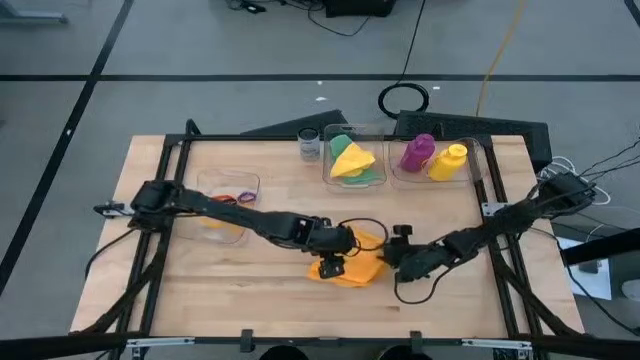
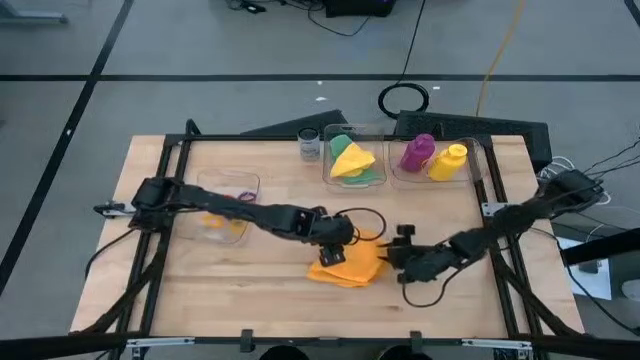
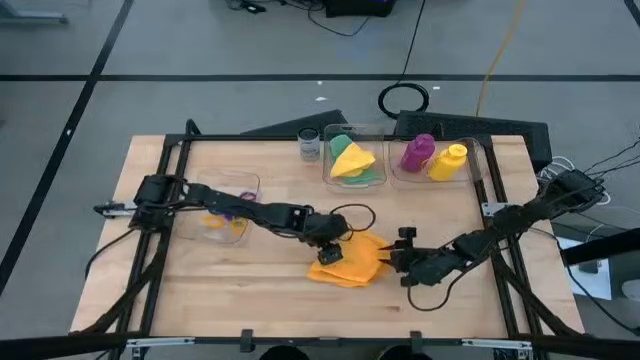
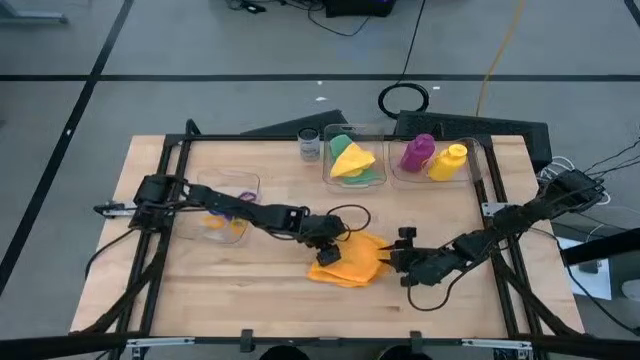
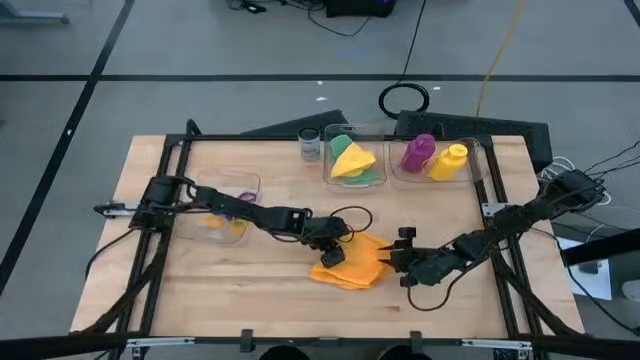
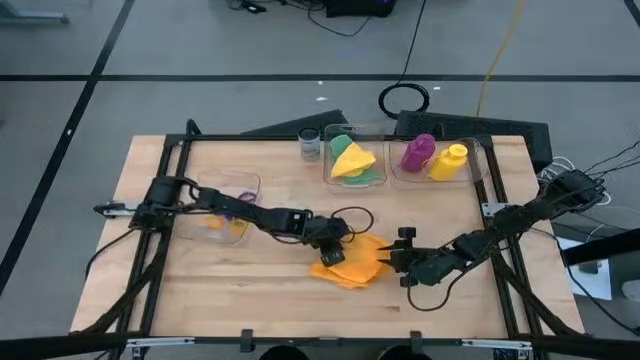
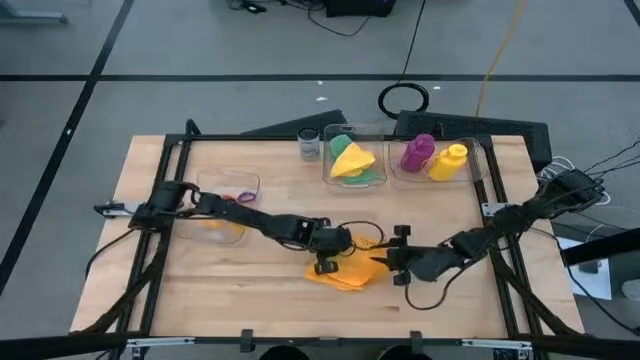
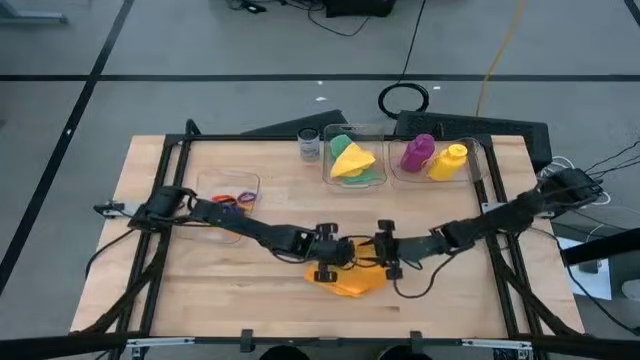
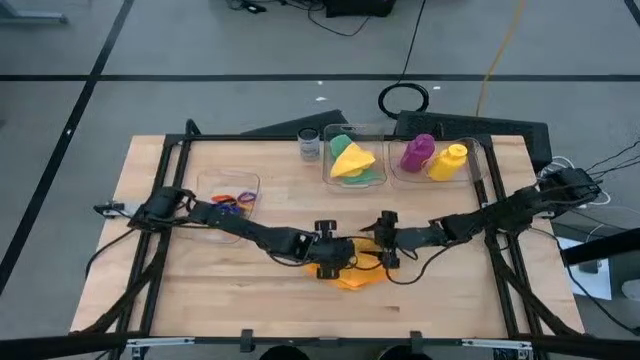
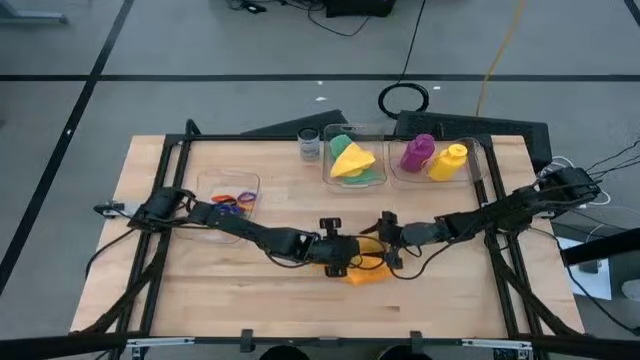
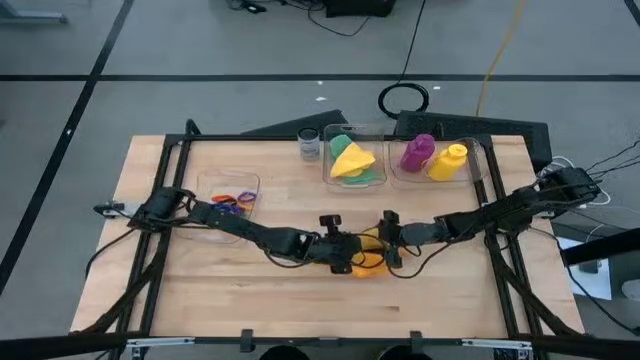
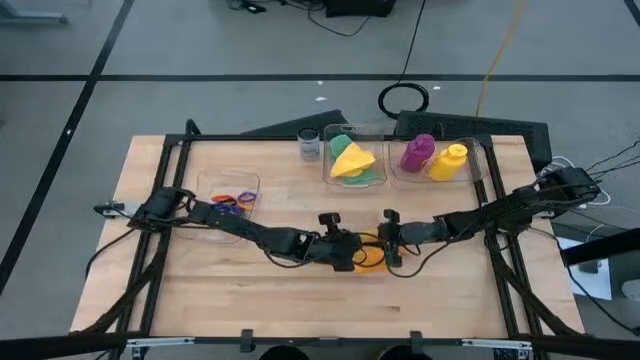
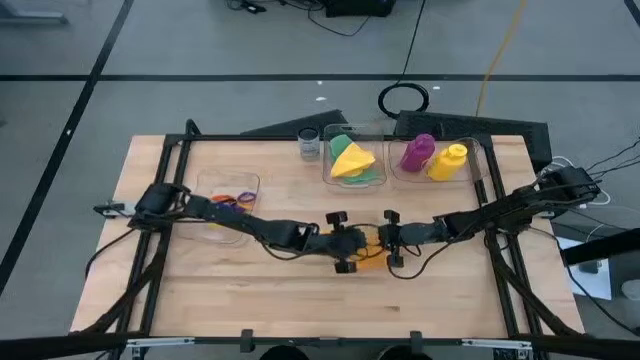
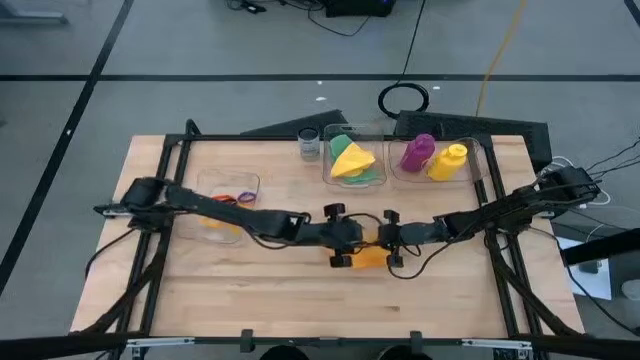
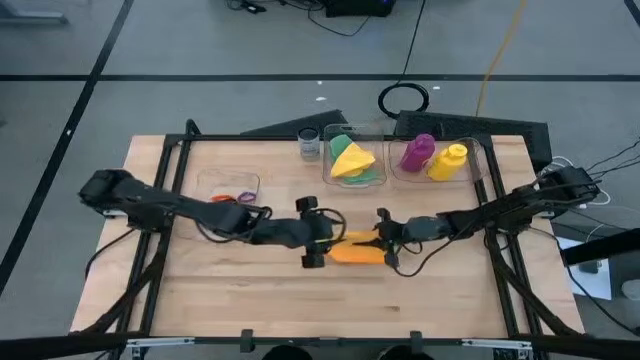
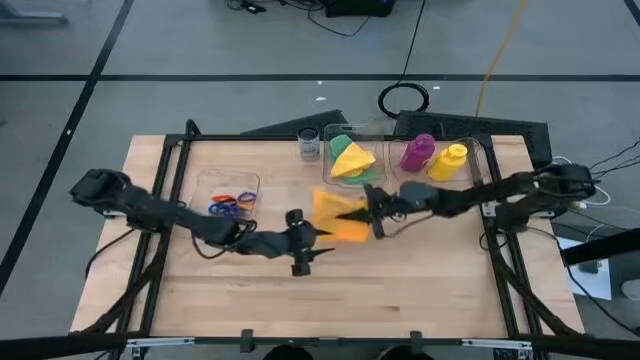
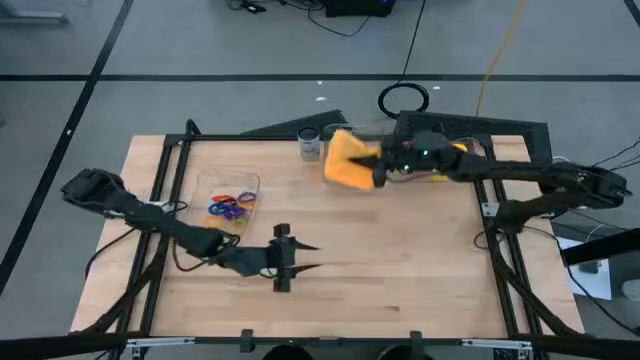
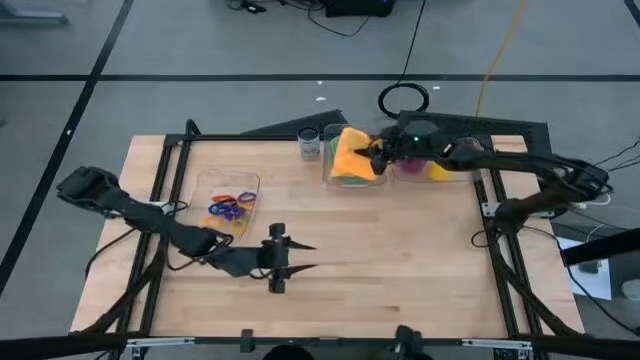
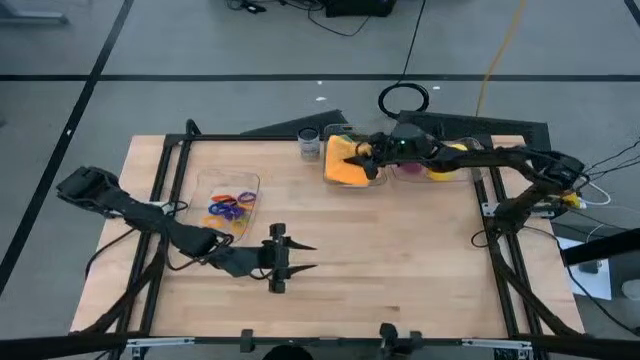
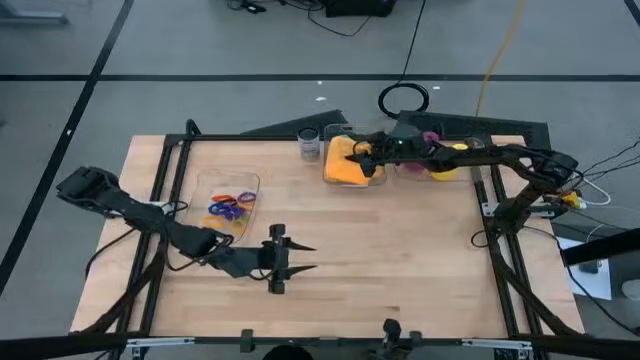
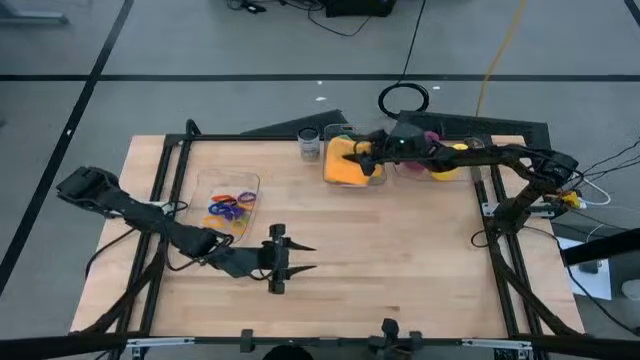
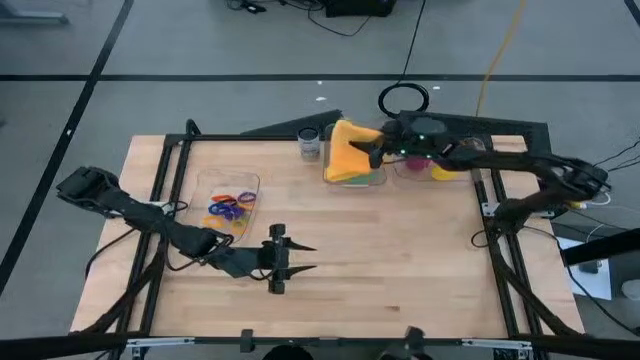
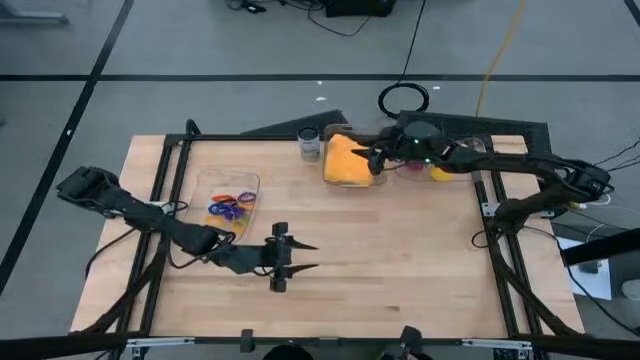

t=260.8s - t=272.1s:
Task: Pick & Place Sports Items
Put the orange towel into the top left transparent bin
